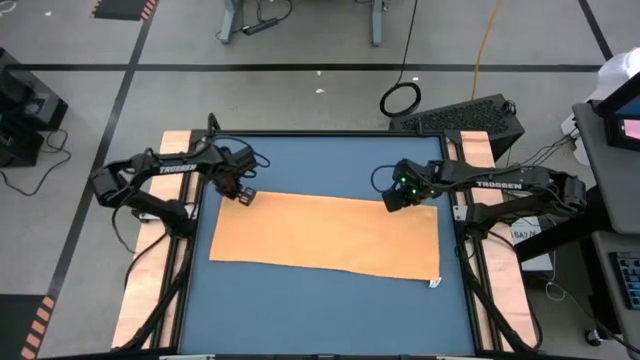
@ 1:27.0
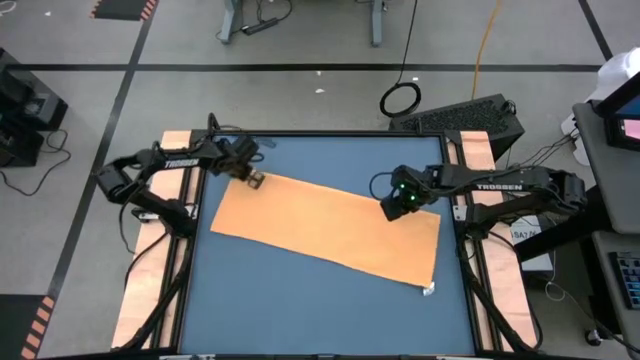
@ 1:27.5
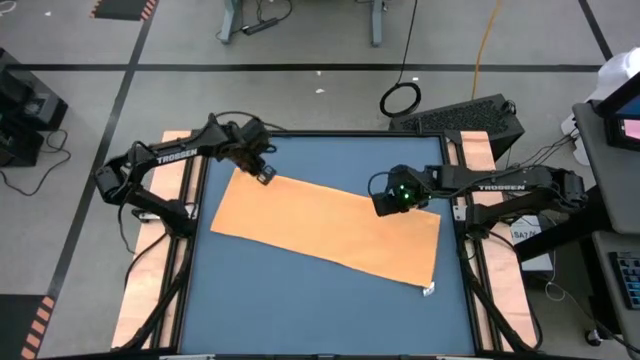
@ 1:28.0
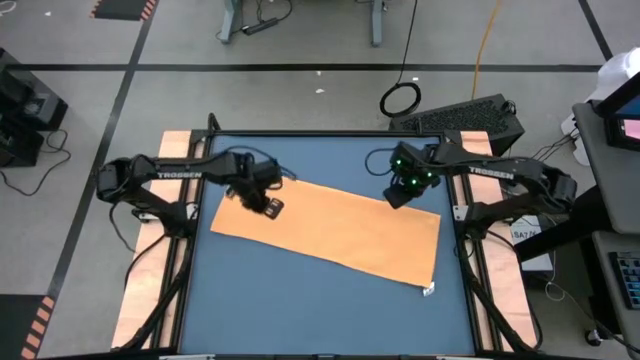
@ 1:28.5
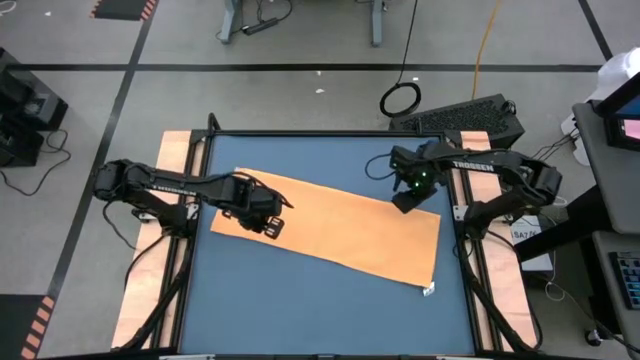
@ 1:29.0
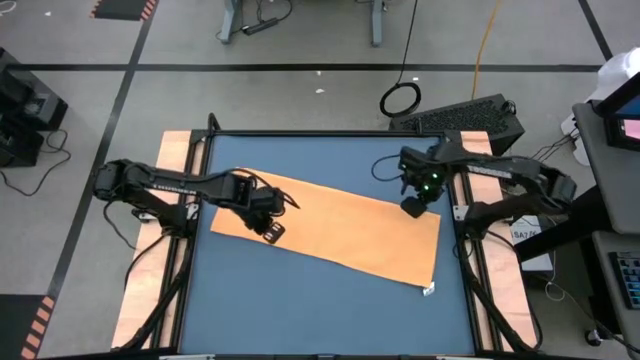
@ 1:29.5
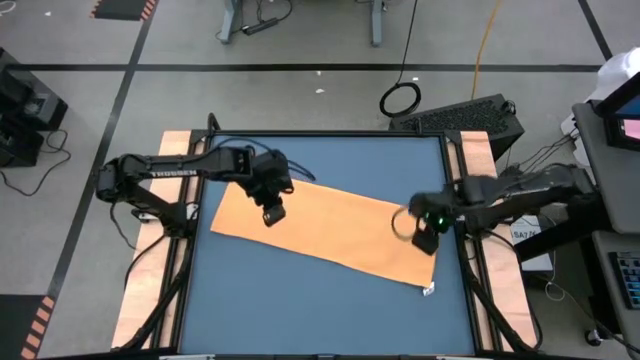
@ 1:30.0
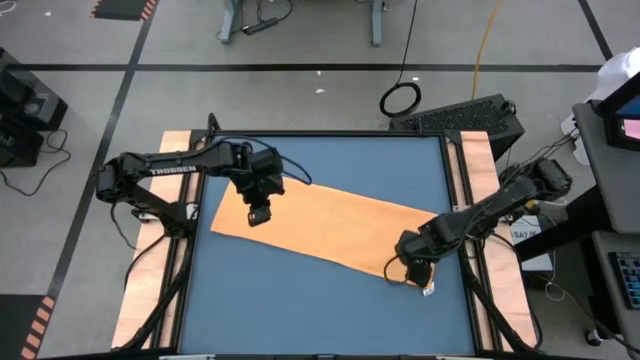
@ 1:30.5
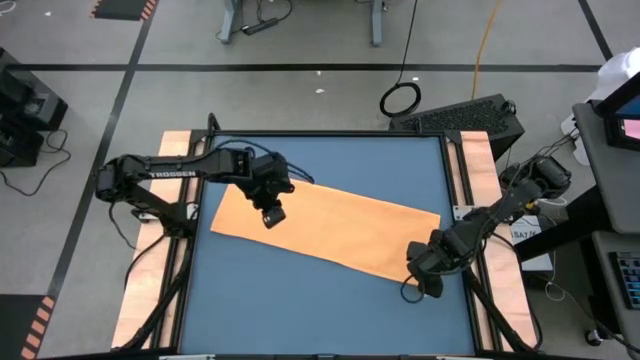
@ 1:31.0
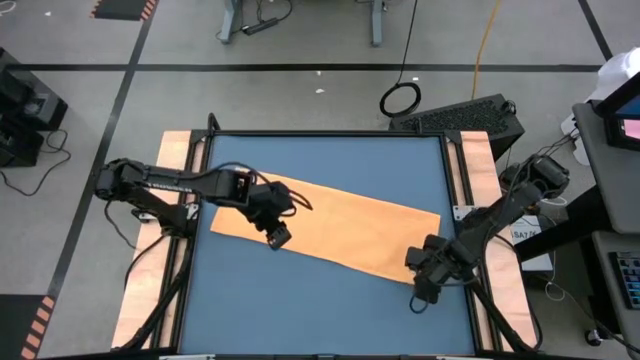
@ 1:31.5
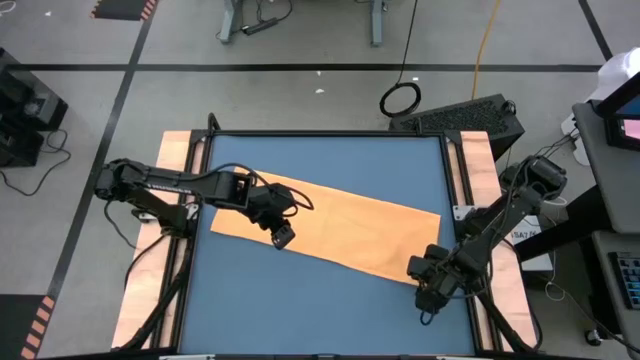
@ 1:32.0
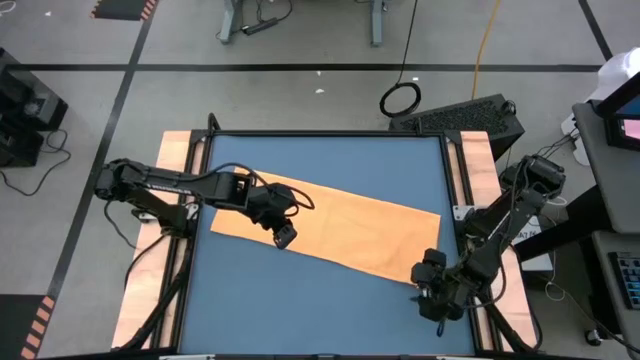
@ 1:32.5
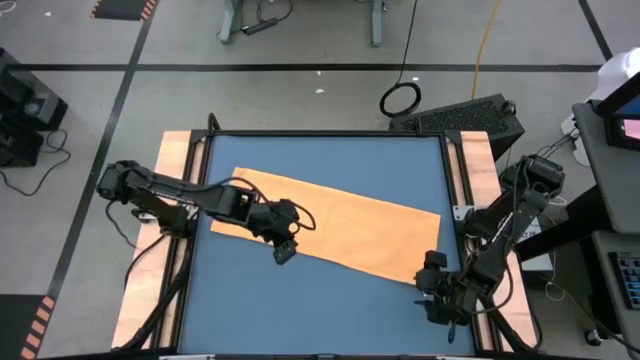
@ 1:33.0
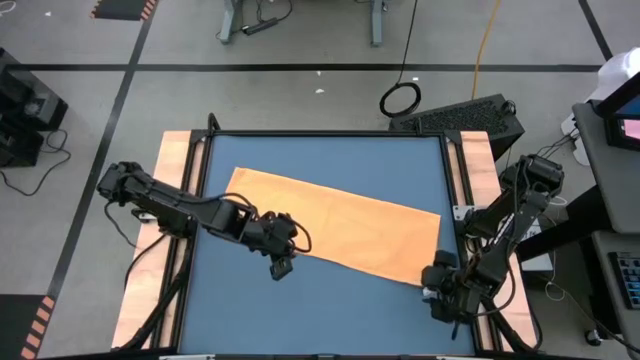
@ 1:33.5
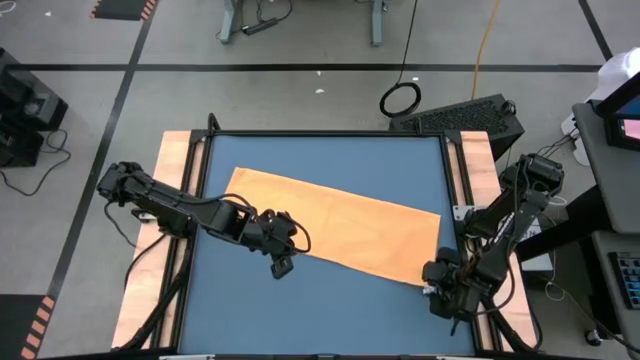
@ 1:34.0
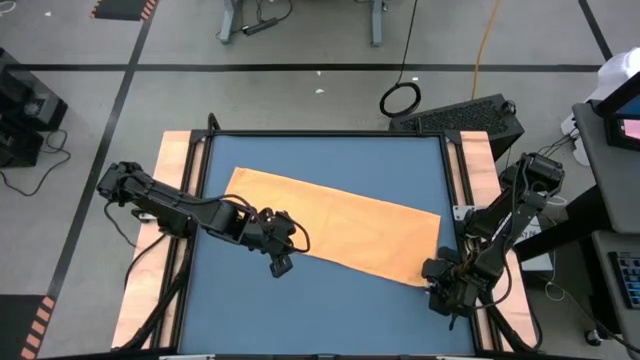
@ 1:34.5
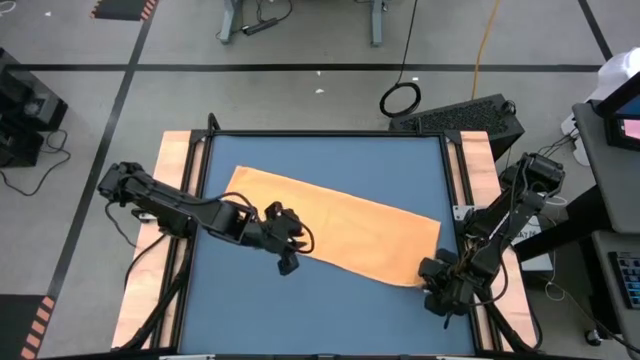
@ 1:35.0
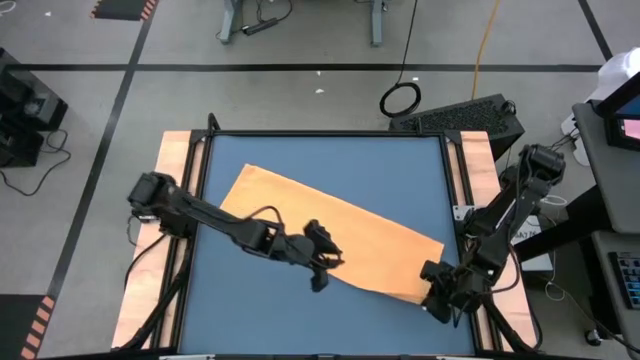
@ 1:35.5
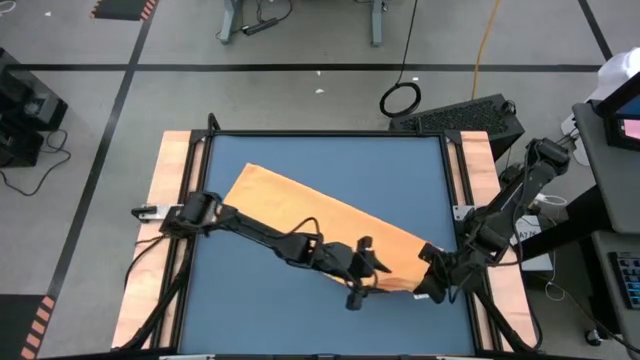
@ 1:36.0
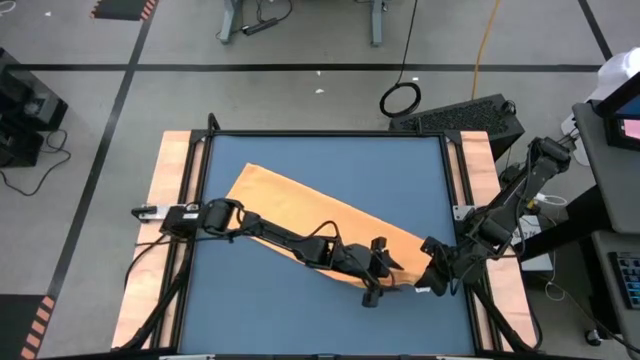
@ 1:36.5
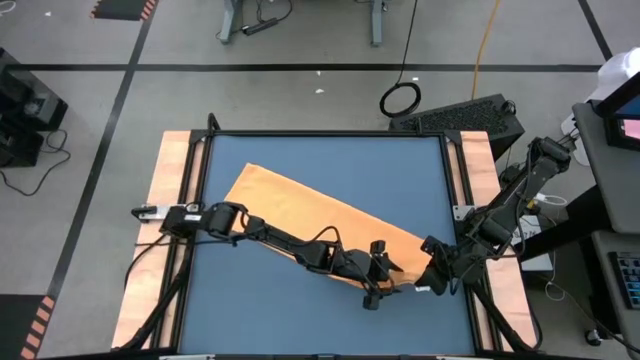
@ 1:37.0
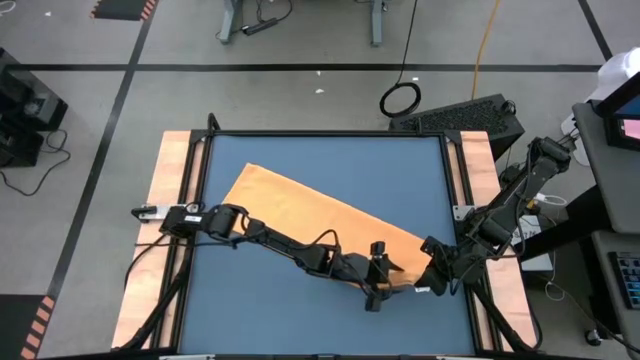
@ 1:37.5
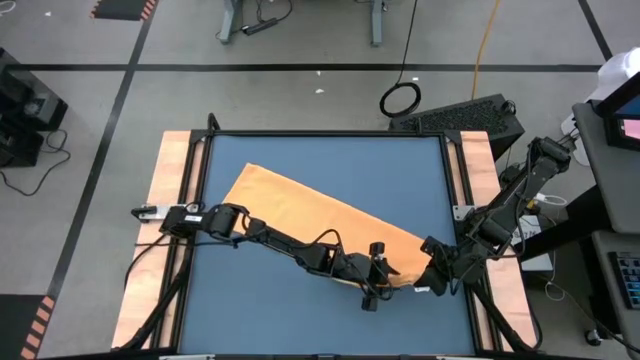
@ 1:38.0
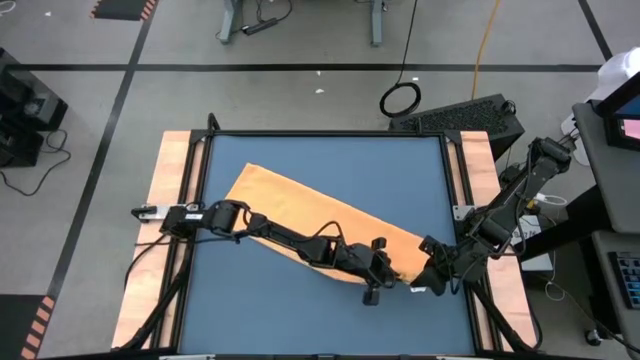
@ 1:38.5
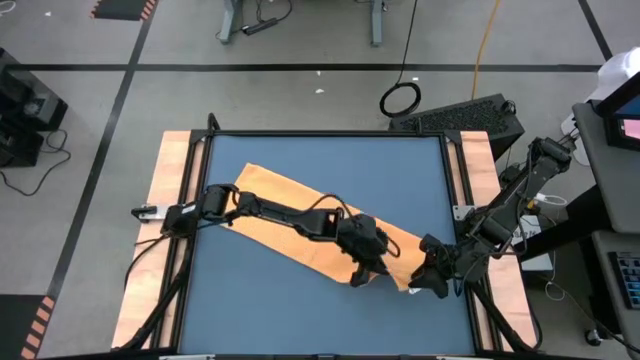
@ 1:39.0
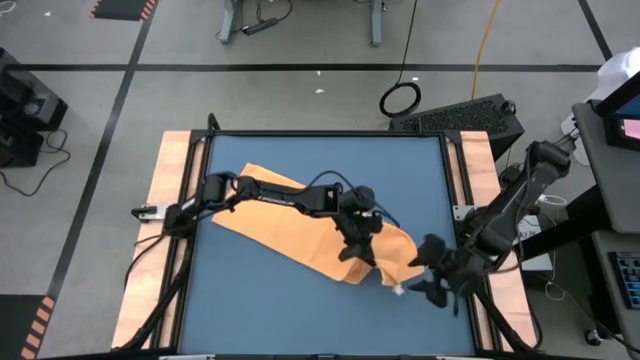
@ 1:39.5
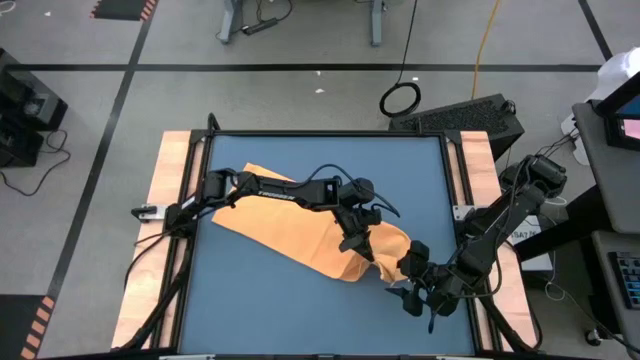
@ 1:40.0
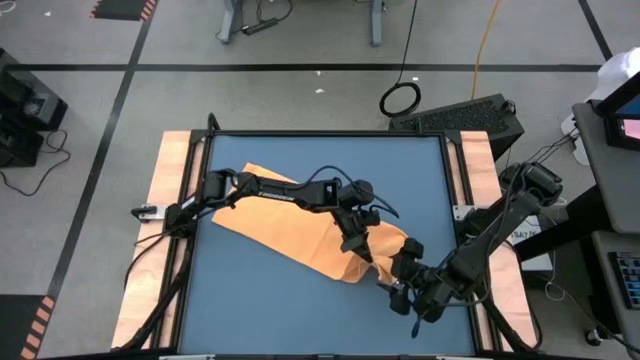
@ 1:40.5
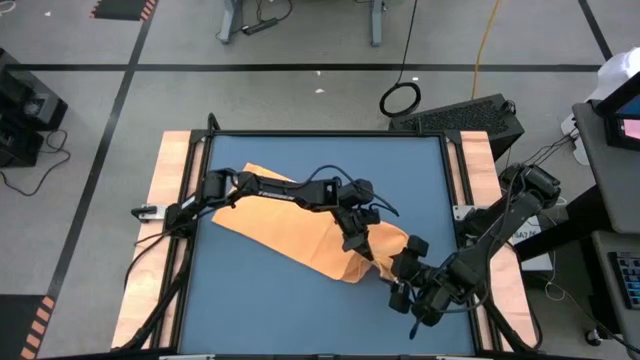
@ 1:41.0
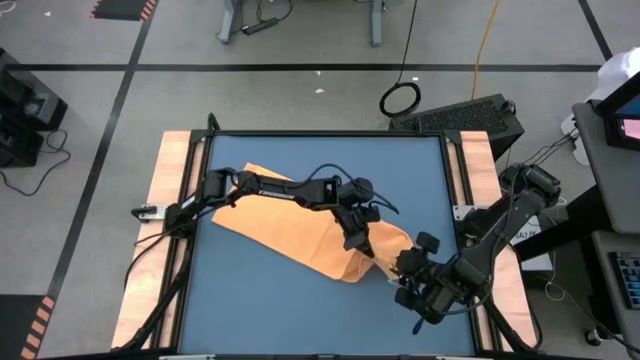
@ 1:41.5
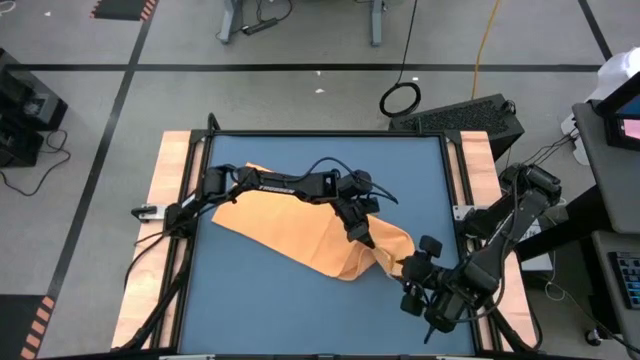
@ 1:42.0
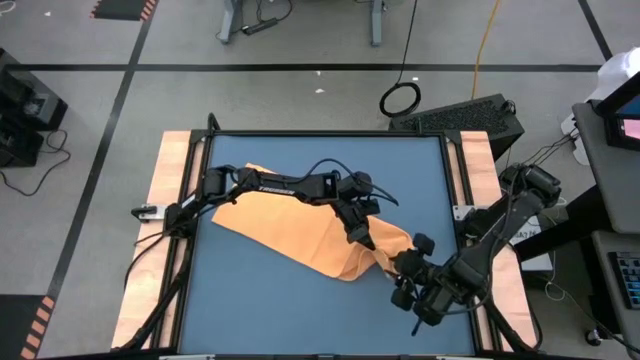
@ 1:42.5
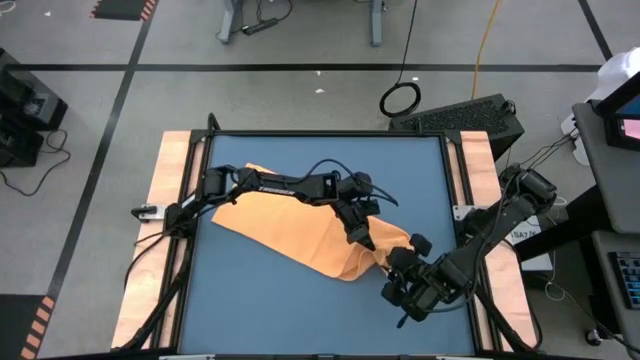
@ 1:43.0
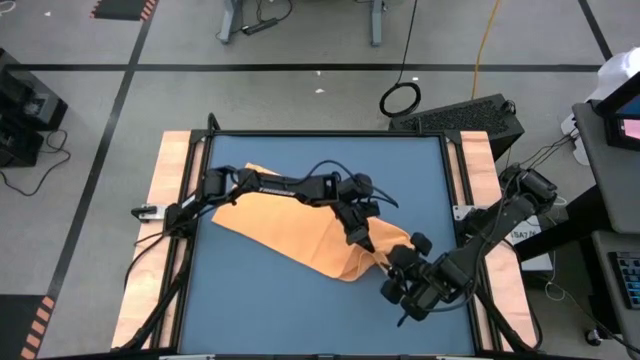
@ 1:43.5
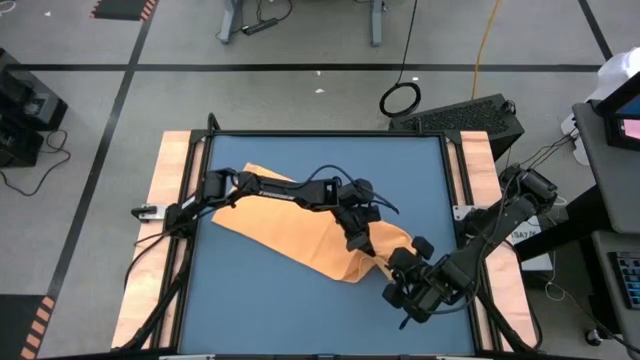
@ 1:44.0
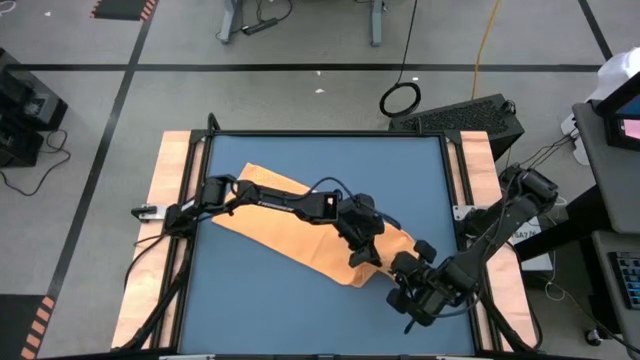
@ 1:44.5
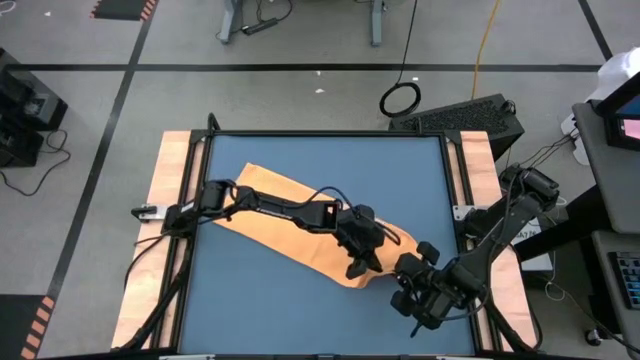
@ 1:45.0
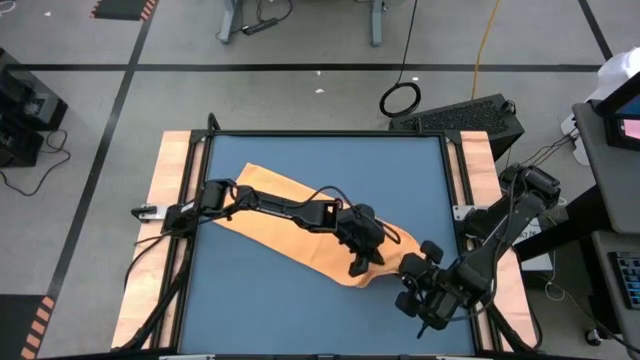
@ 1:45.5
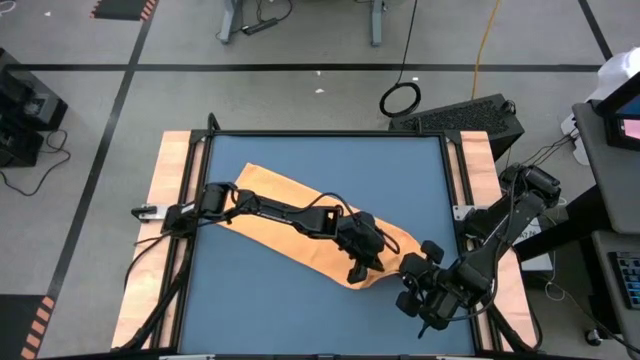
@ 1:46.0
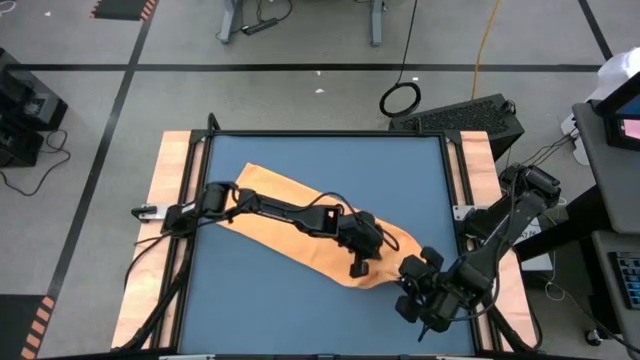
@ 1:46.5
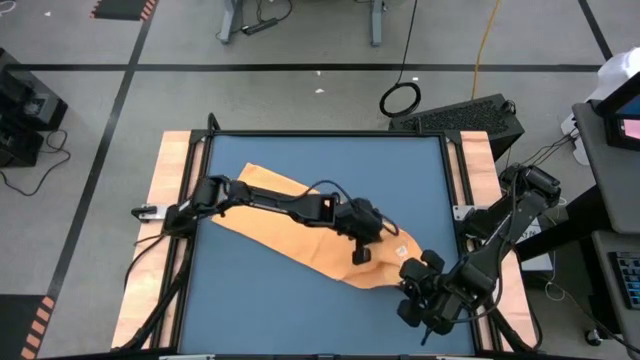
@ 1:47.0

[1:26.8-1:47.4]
Task: Roll towel into tight, uniform cylinder
Fold the orange microfiber cloth

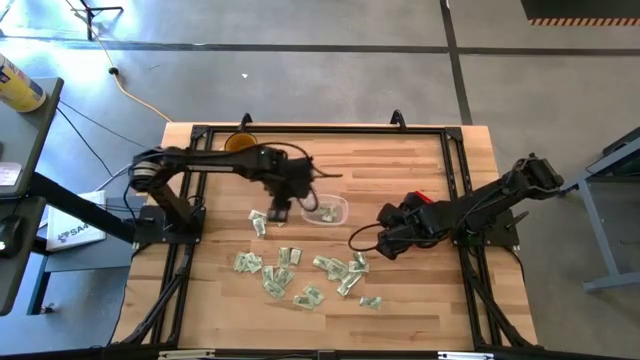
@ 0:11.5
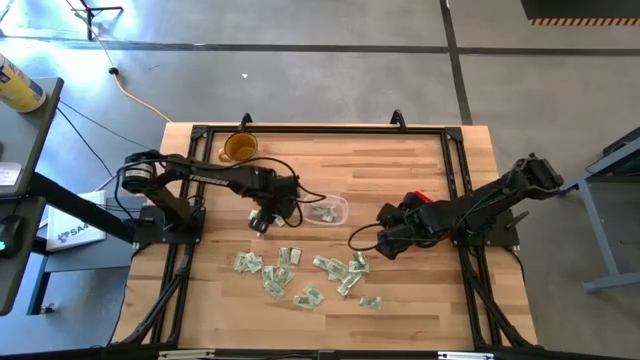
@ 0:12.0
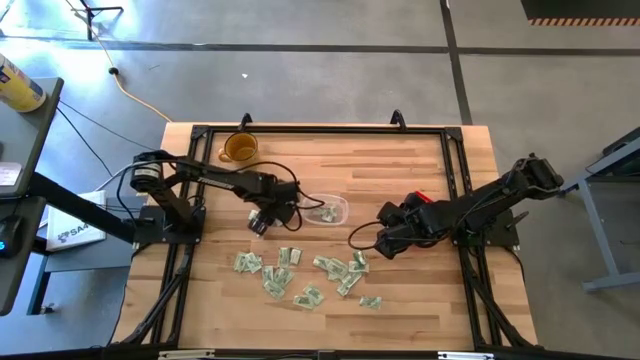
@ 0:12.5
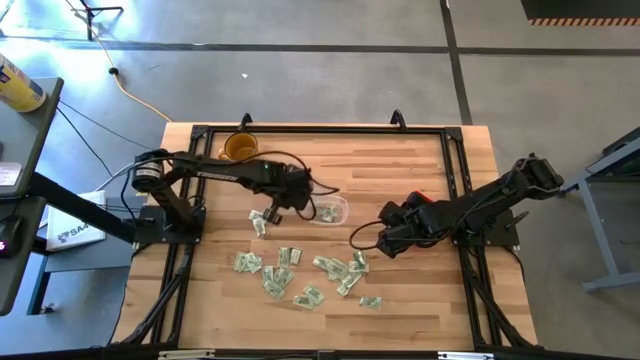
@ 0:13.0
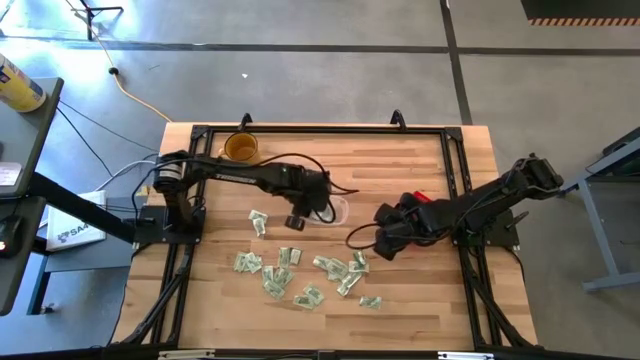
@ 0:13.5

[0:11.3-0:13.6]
Task: Pick and place items into bin
Put the white stevia packet into the transparent bin
